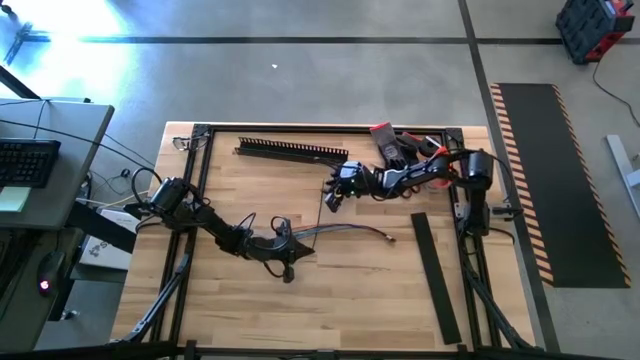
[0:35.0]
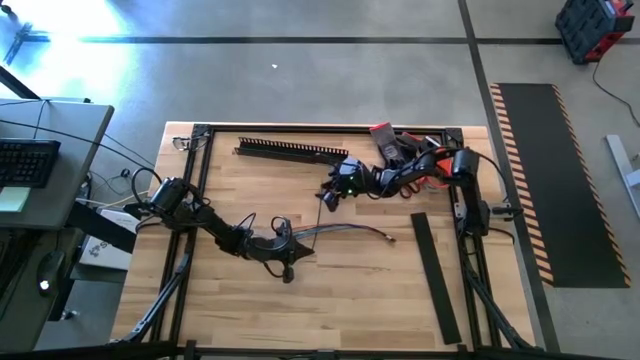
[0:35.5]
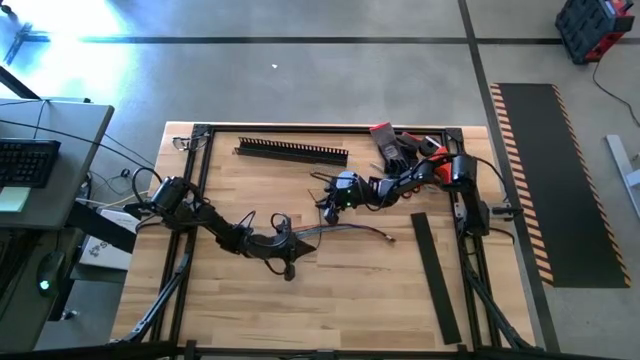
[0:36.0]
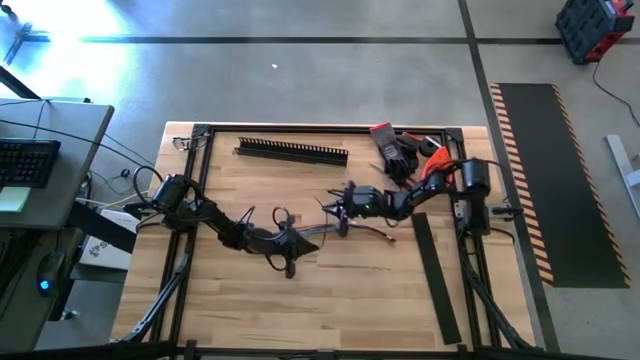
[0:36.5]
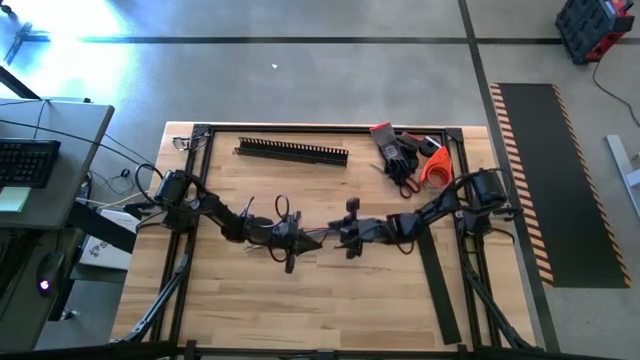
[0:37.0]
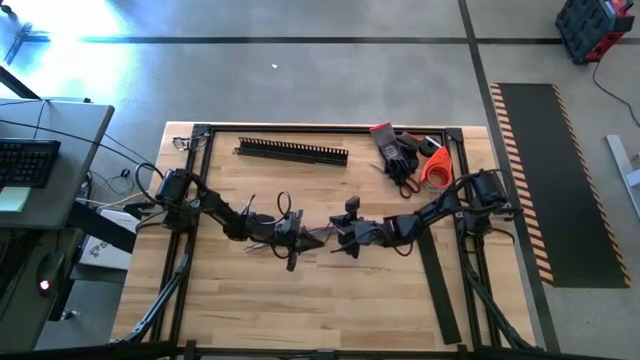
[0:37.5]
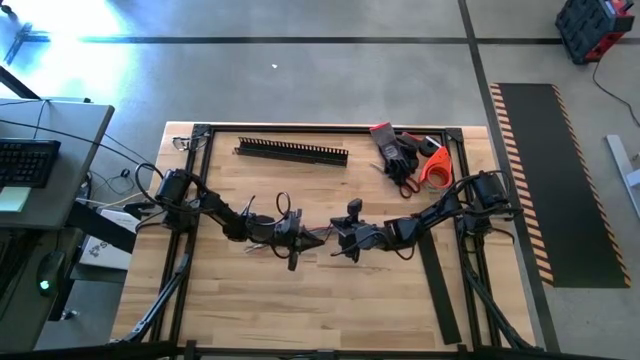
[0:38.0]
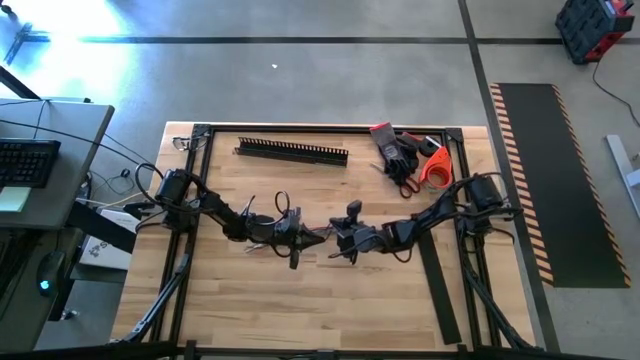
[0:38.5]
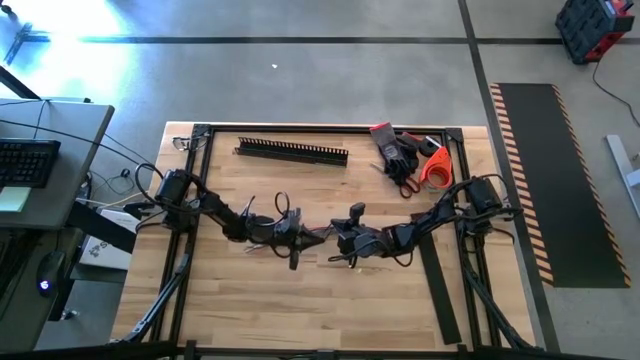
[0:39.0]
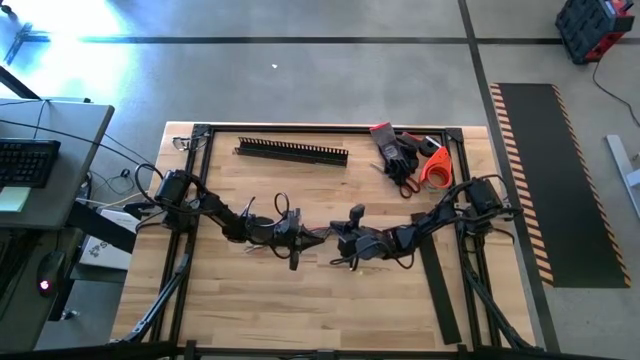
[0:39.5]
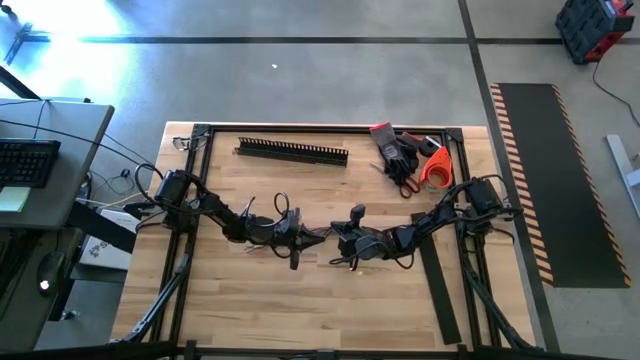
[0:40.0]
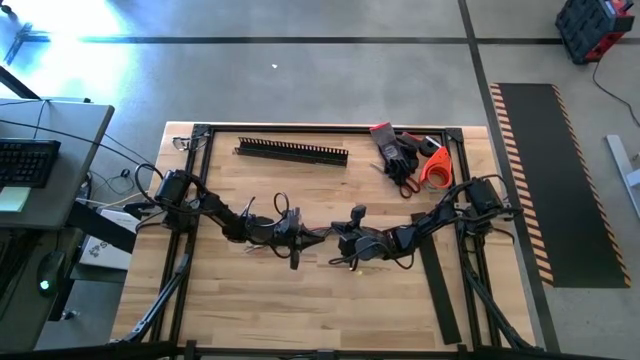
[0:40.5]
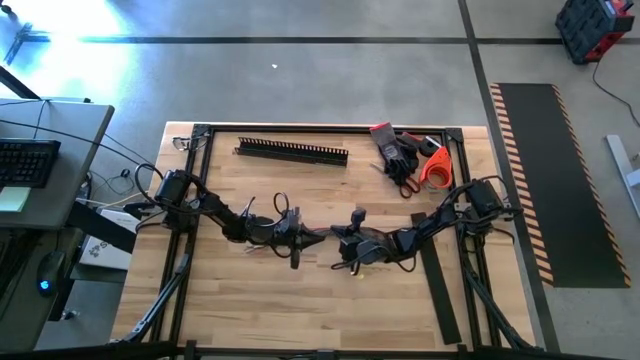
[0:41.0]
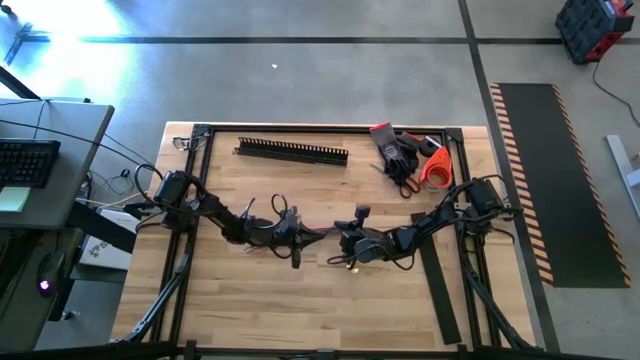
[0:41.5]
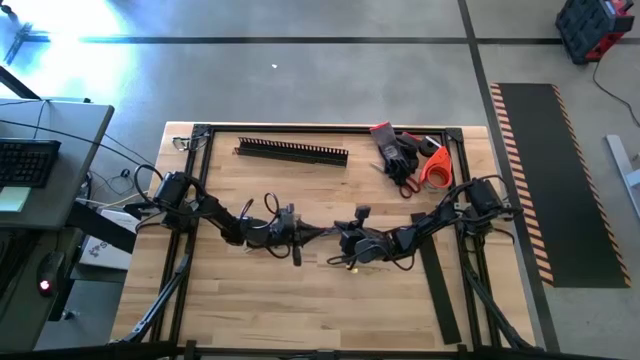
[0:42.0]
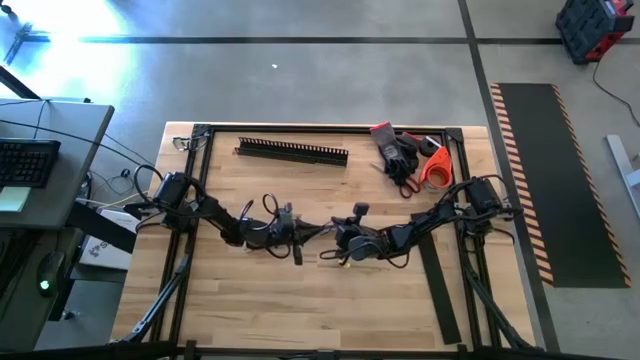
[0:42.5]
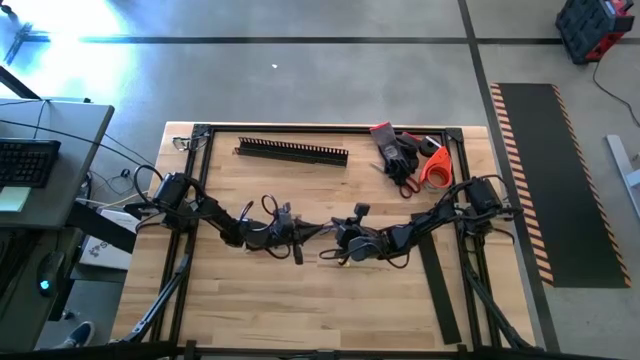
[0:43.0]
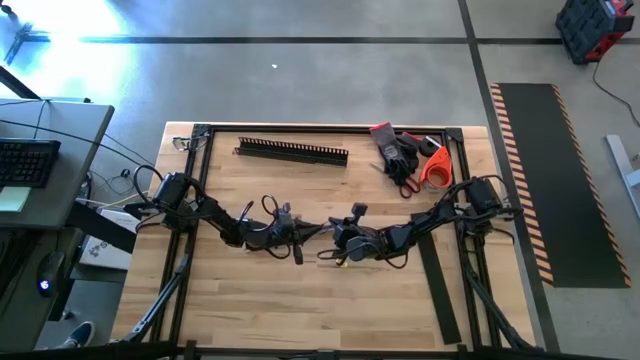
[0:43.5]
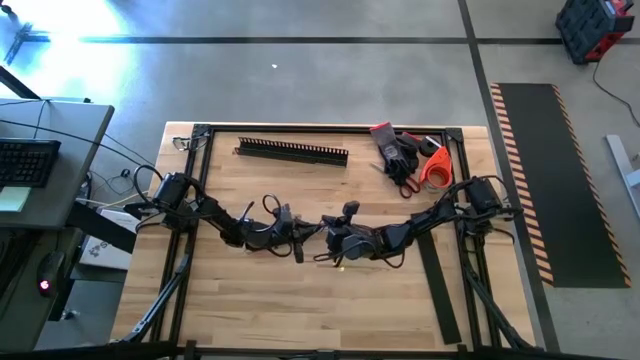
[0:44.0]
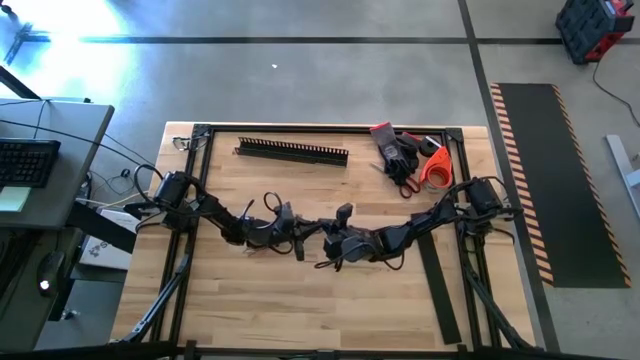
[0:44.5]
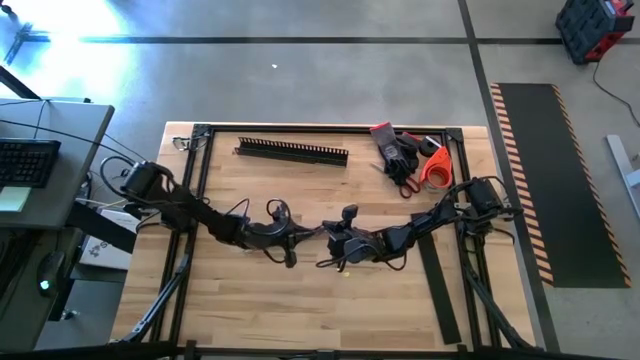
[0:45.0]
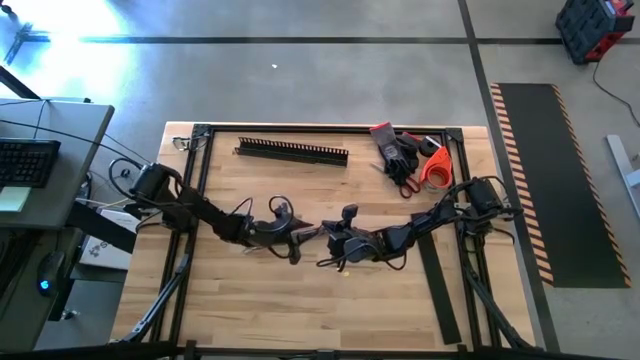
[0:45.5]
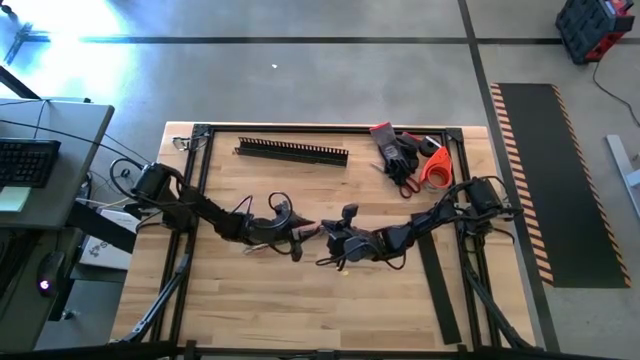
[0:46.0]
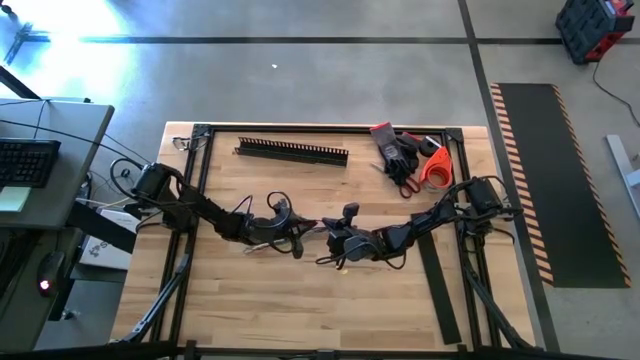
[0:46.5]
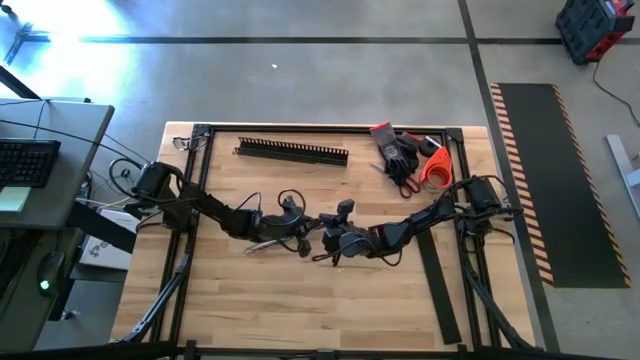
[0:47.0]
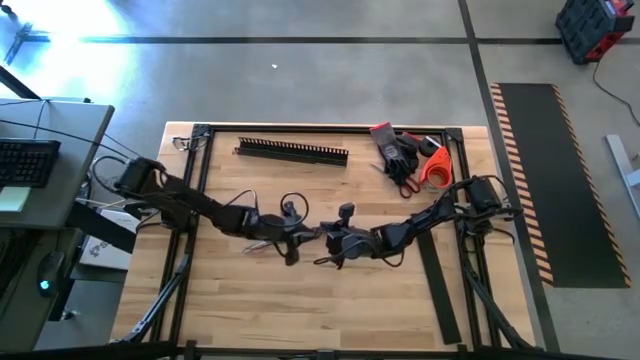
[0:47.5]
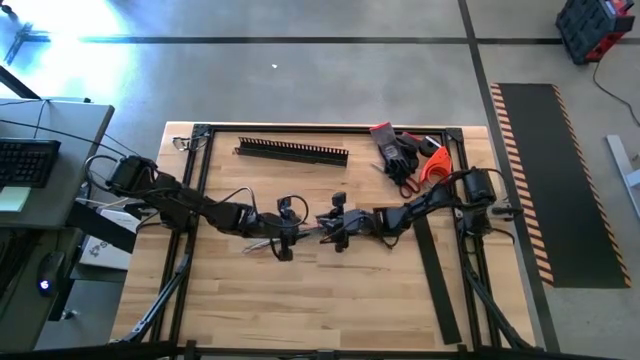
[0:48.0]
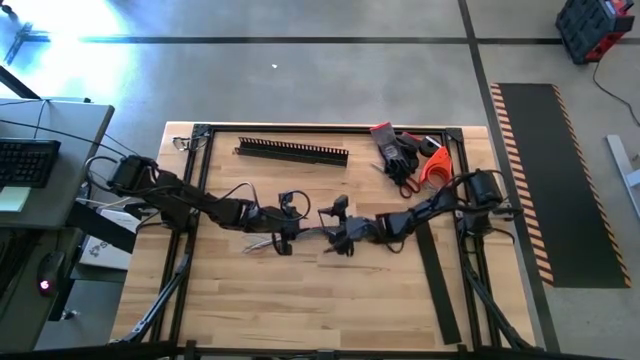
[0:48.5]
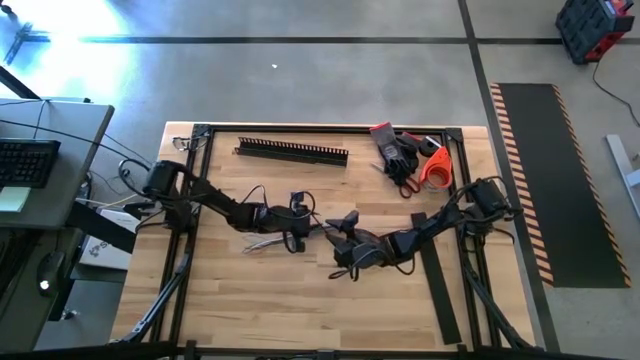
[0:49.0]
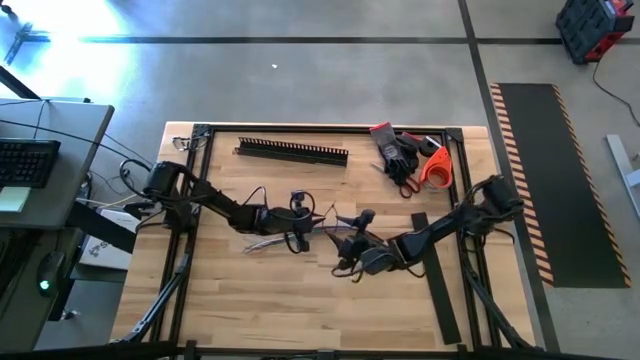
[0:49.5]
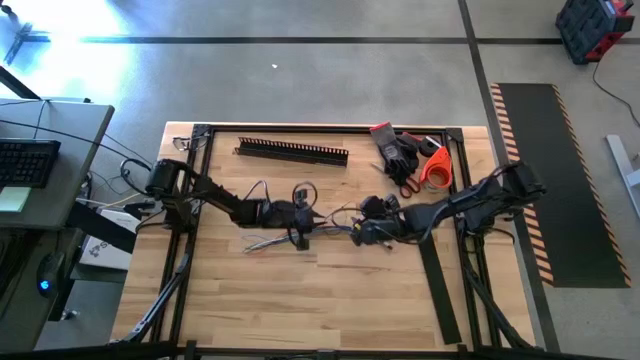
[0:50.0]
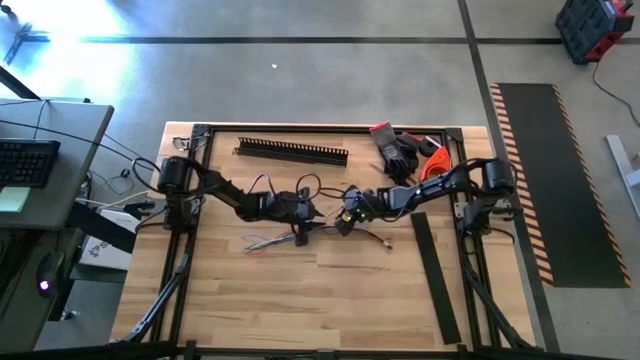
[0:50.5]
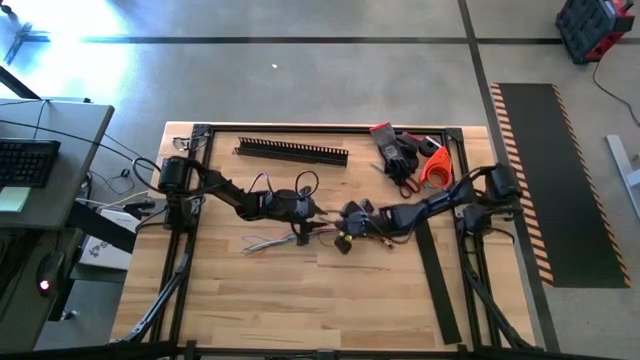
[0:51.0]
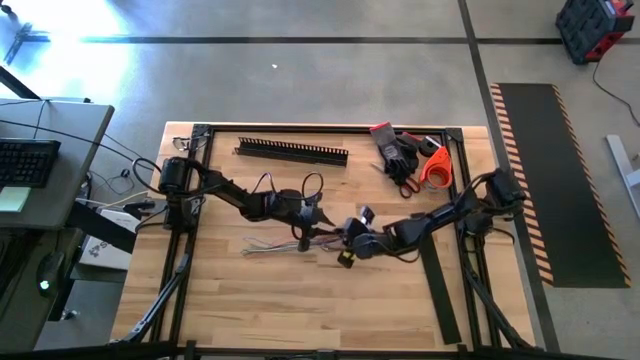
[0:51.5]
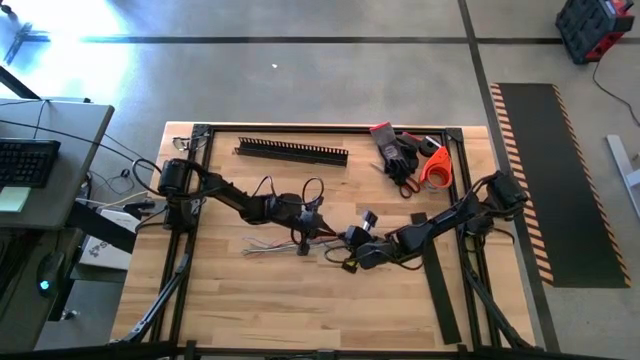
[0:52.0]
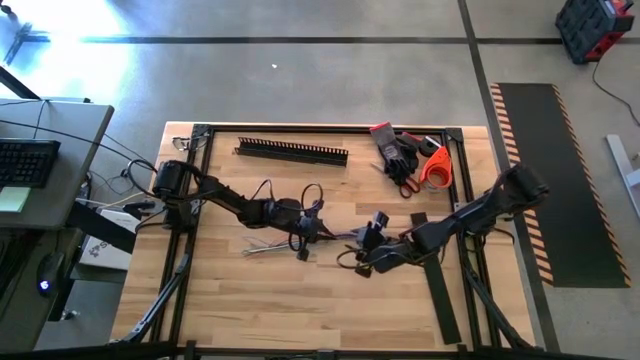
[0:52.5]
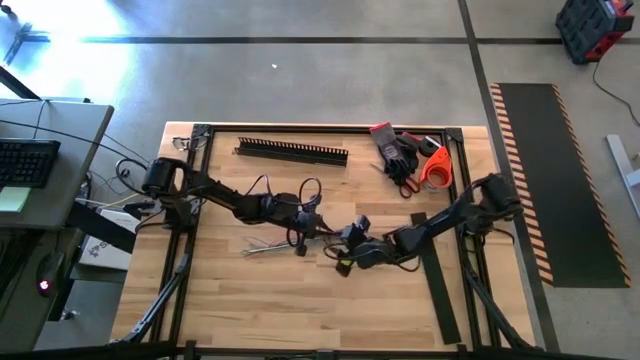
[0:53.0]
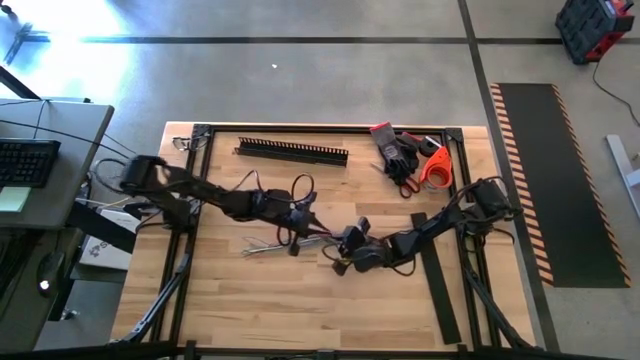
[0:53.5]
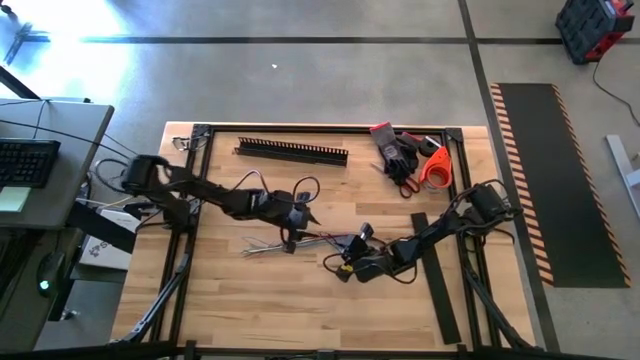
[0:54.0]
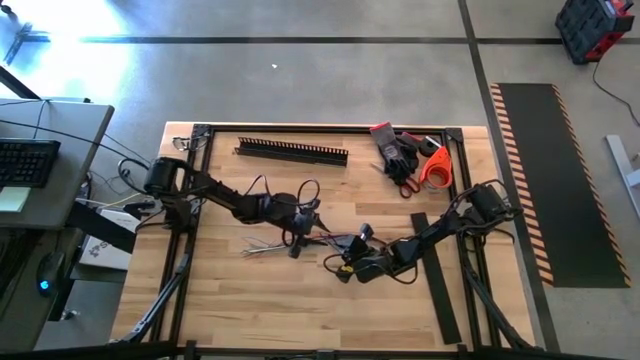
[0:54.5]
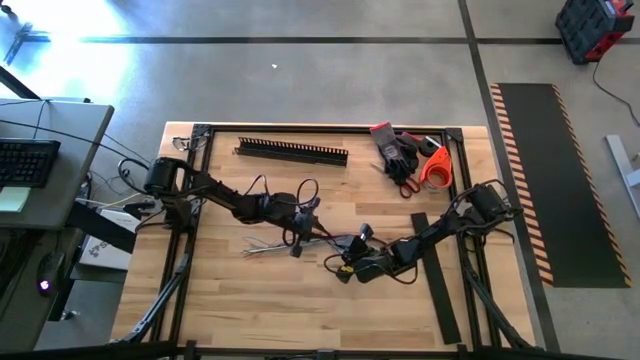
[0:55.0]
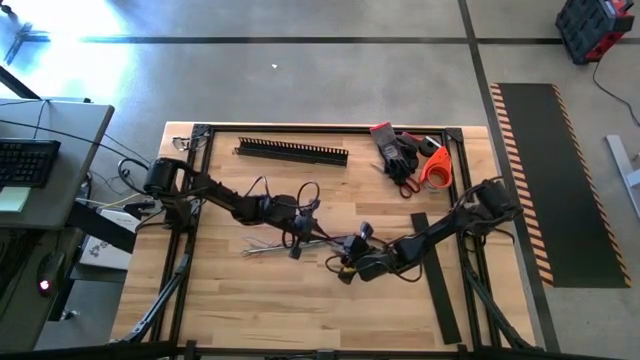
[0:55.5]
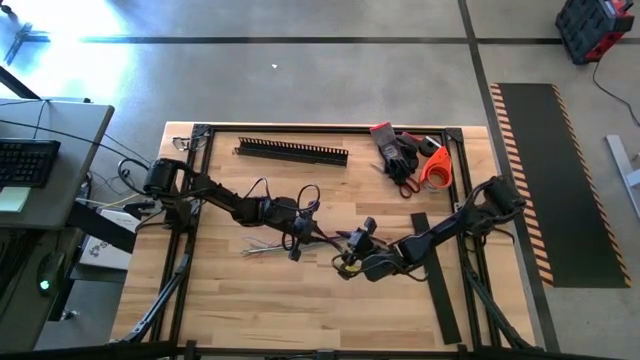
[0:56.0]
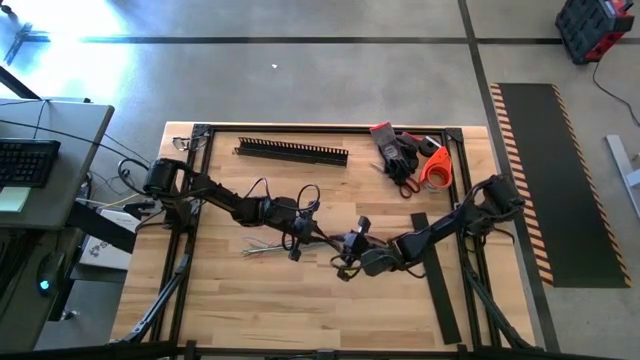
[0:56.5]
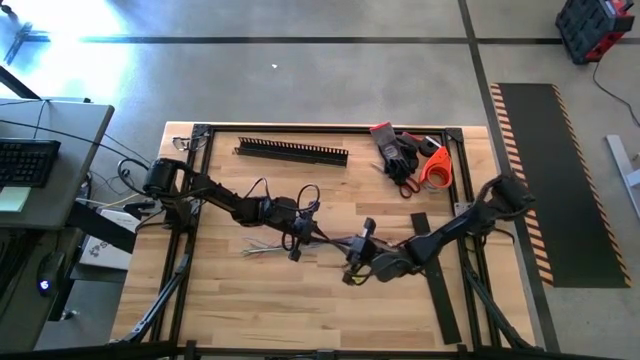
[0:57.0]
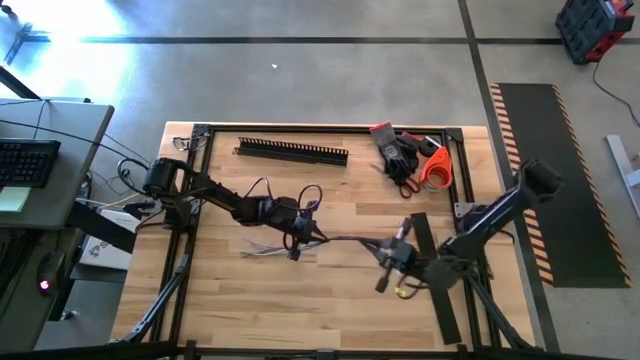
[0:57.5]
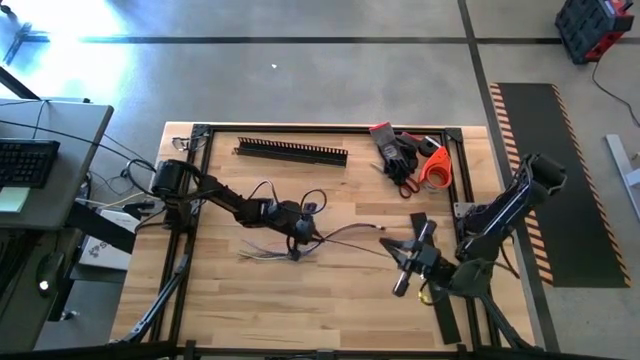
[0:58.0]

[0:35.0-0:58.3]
Task: Ziptie cables
Wrap the zip tie around the cable wires
